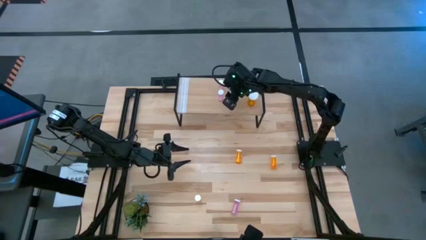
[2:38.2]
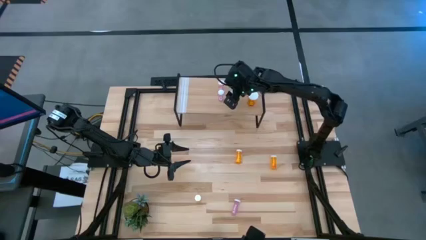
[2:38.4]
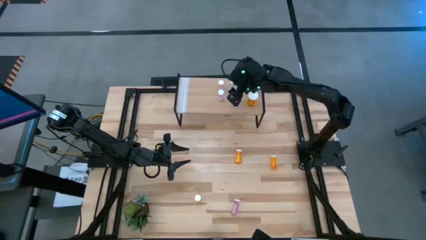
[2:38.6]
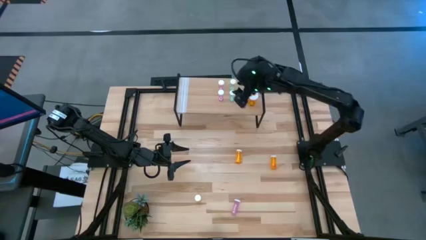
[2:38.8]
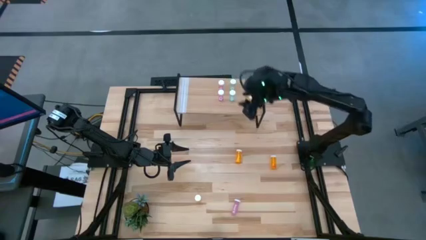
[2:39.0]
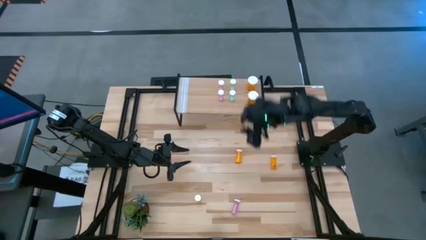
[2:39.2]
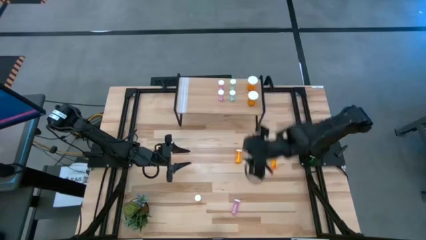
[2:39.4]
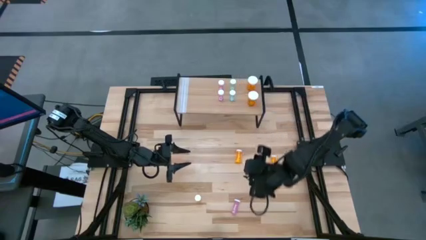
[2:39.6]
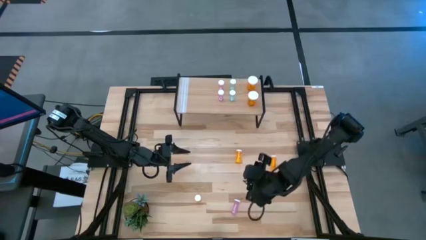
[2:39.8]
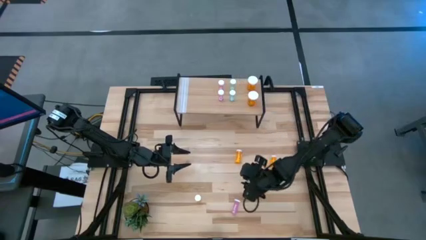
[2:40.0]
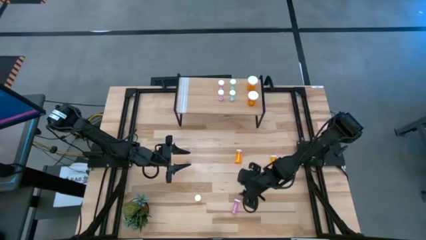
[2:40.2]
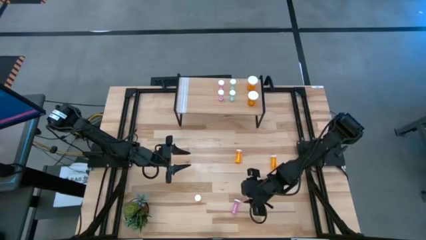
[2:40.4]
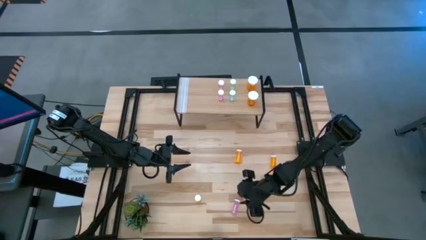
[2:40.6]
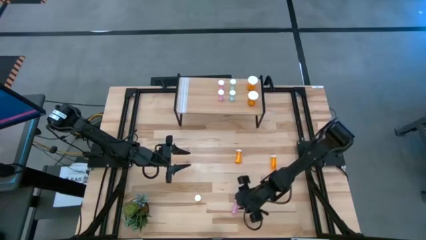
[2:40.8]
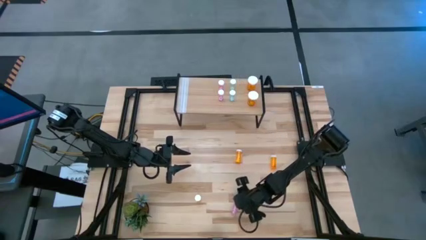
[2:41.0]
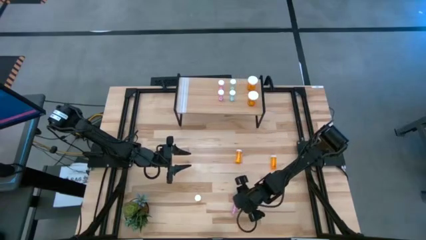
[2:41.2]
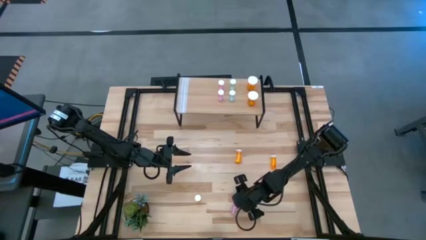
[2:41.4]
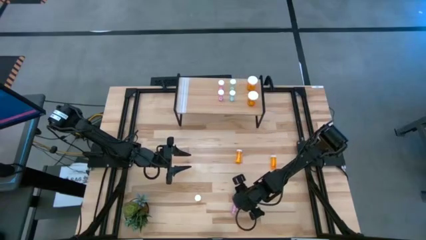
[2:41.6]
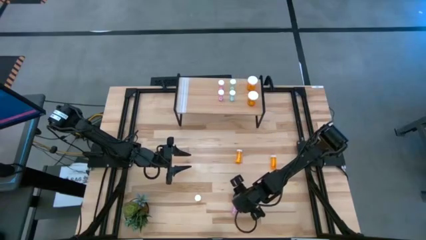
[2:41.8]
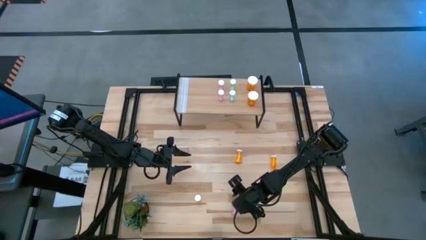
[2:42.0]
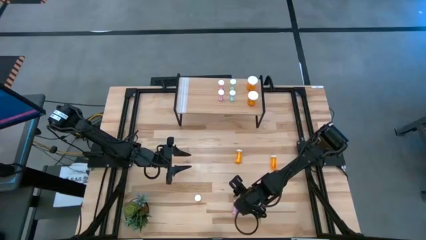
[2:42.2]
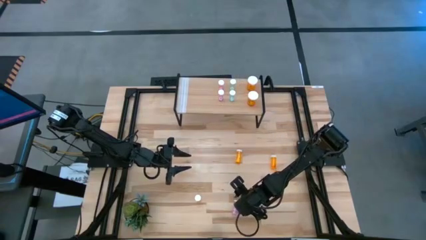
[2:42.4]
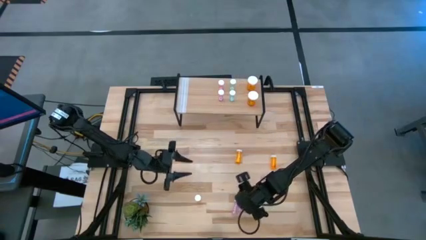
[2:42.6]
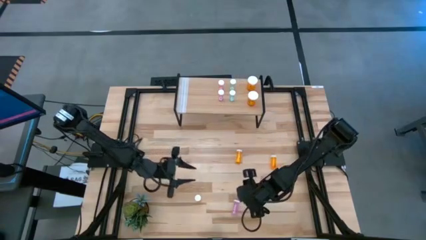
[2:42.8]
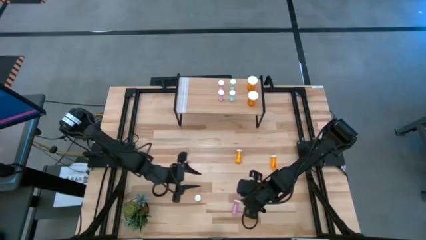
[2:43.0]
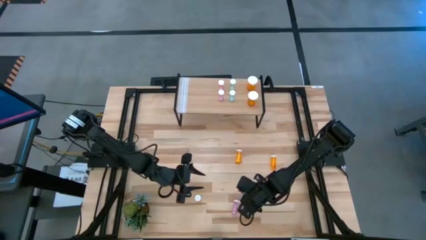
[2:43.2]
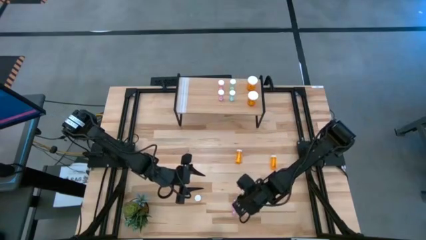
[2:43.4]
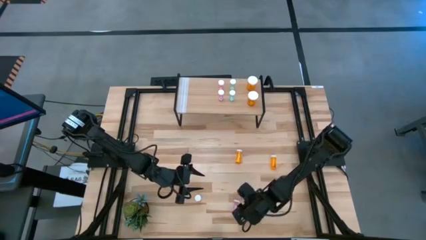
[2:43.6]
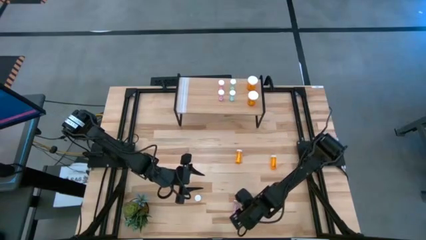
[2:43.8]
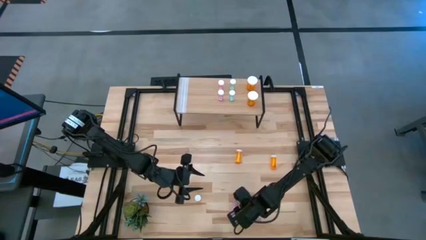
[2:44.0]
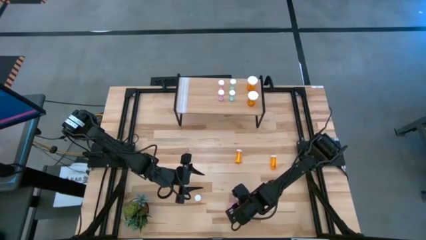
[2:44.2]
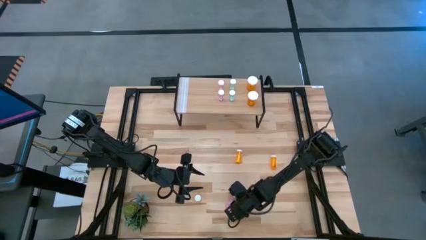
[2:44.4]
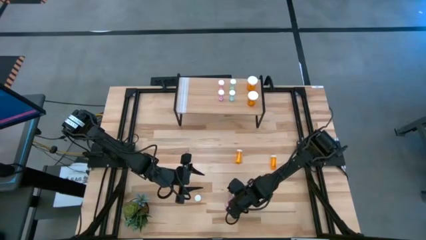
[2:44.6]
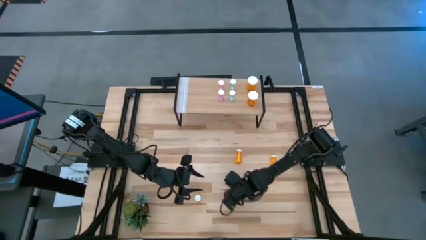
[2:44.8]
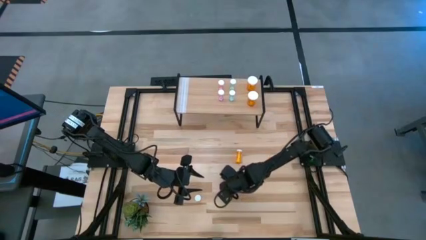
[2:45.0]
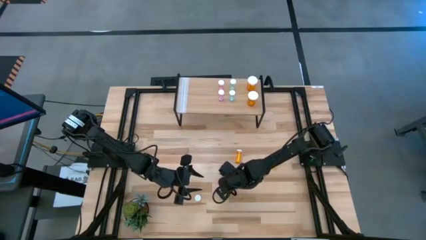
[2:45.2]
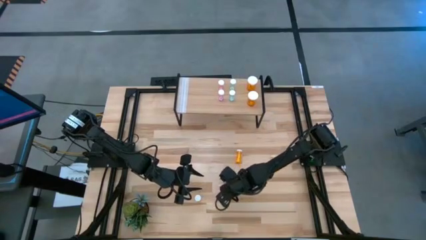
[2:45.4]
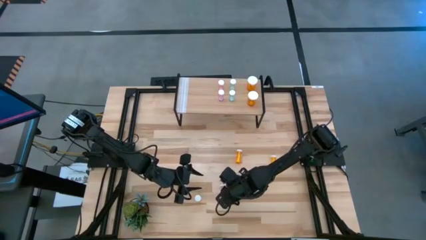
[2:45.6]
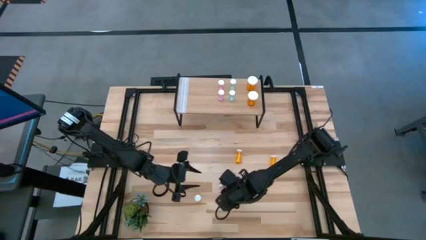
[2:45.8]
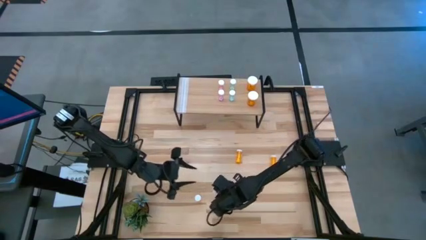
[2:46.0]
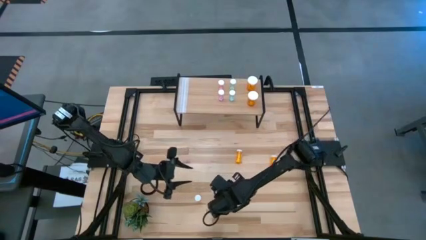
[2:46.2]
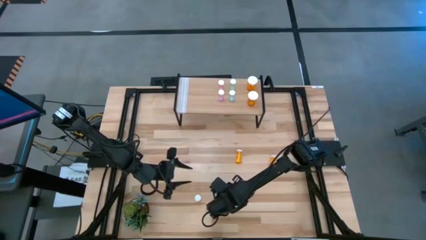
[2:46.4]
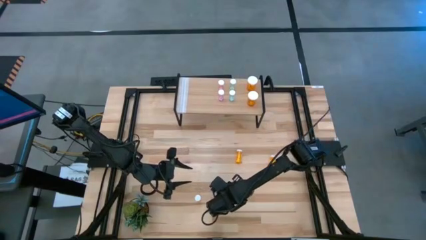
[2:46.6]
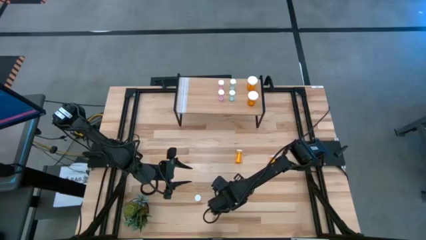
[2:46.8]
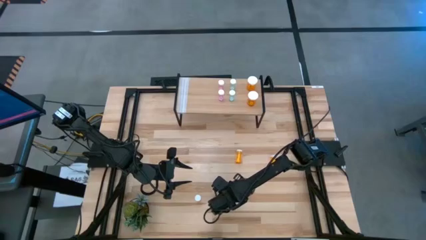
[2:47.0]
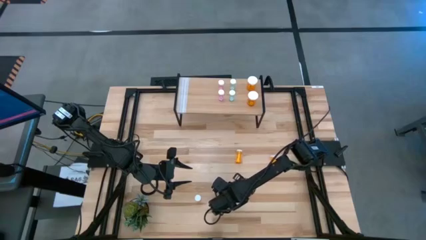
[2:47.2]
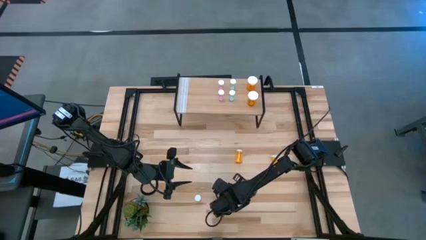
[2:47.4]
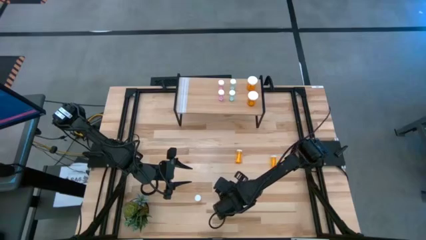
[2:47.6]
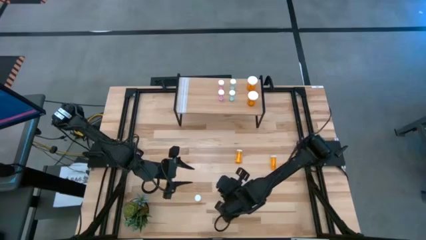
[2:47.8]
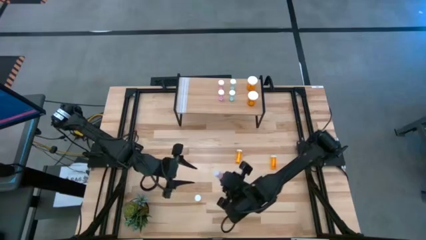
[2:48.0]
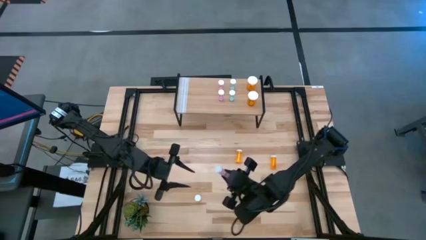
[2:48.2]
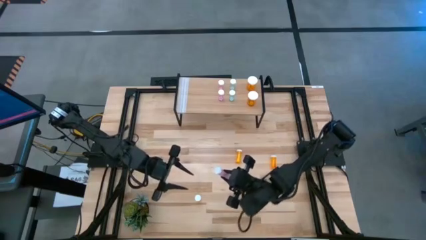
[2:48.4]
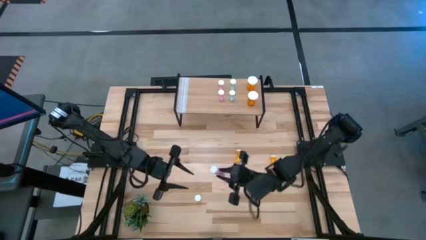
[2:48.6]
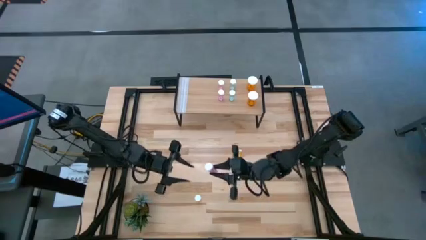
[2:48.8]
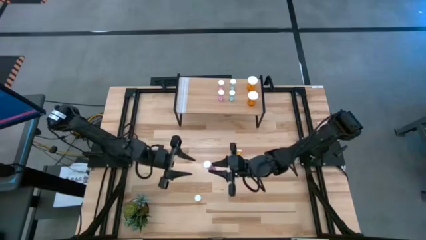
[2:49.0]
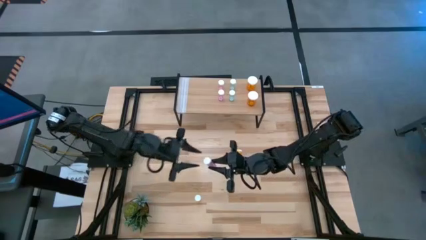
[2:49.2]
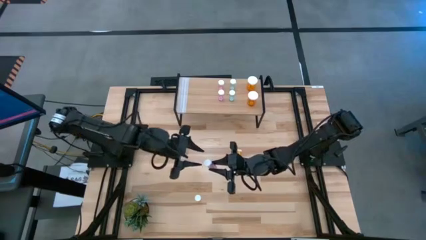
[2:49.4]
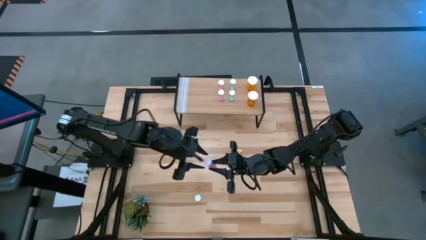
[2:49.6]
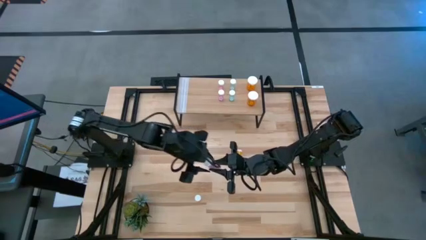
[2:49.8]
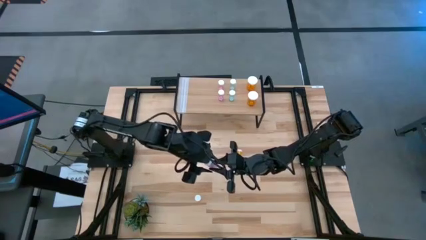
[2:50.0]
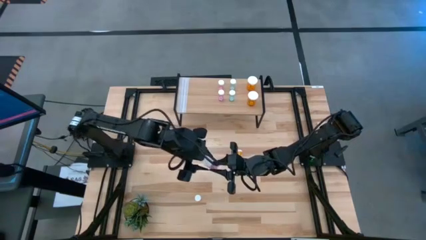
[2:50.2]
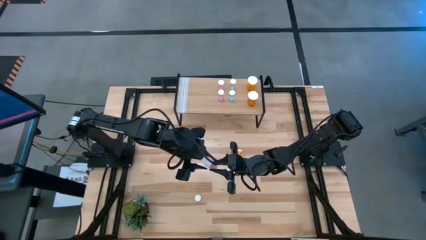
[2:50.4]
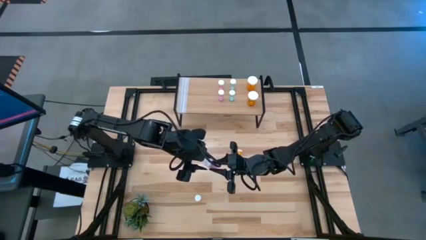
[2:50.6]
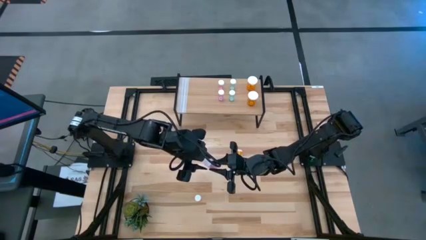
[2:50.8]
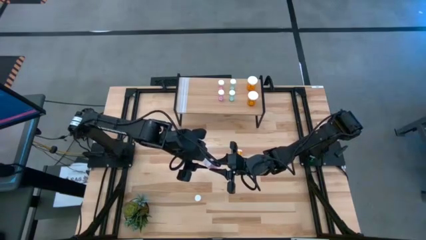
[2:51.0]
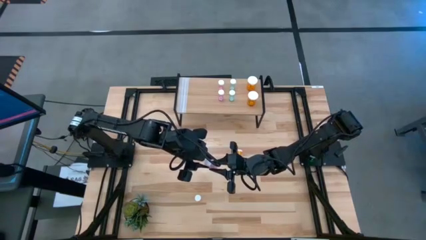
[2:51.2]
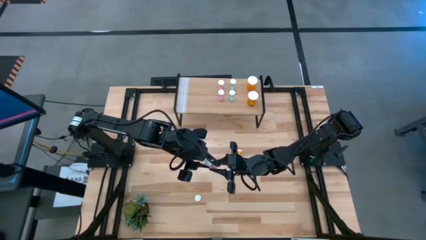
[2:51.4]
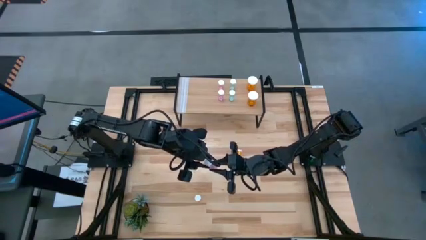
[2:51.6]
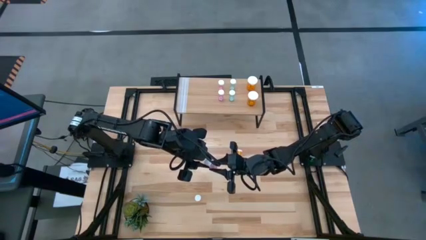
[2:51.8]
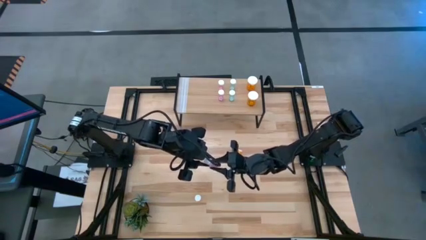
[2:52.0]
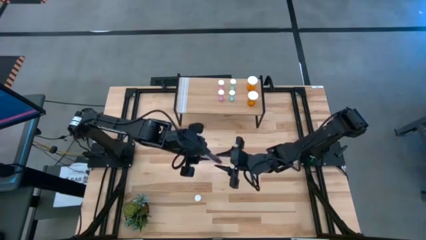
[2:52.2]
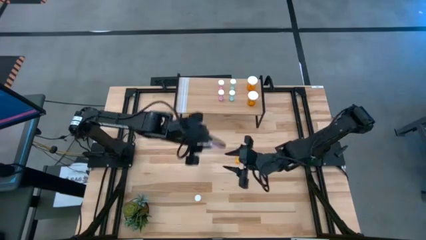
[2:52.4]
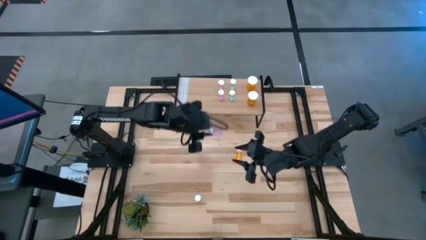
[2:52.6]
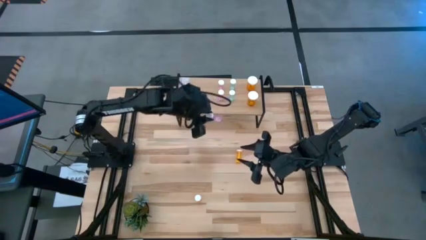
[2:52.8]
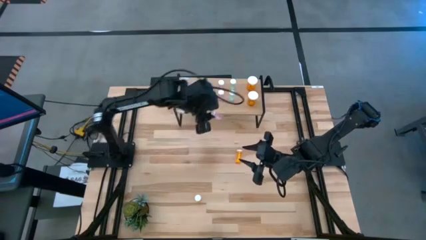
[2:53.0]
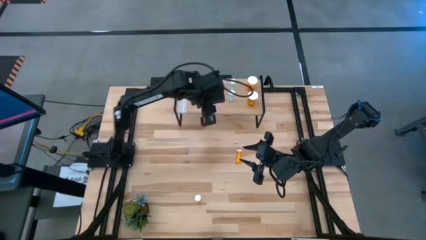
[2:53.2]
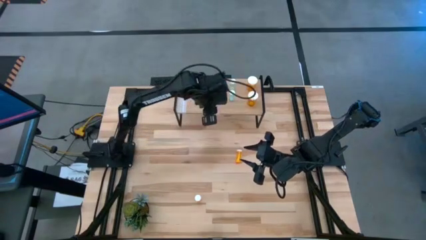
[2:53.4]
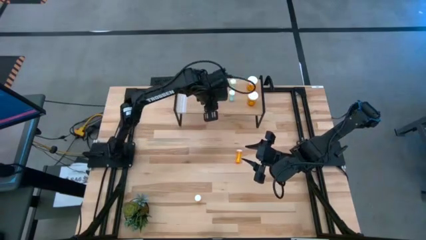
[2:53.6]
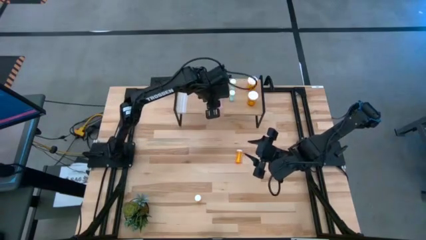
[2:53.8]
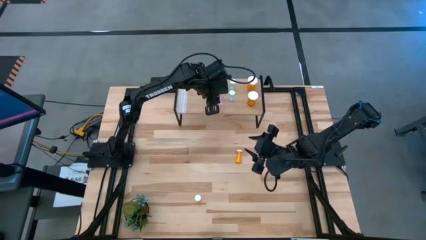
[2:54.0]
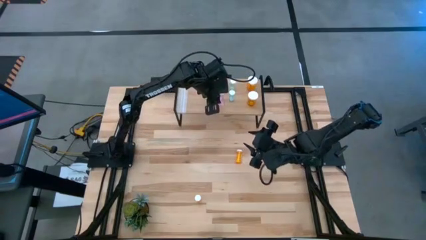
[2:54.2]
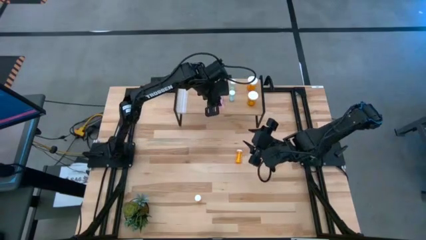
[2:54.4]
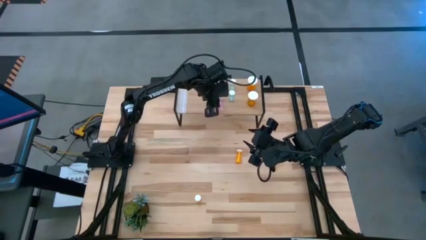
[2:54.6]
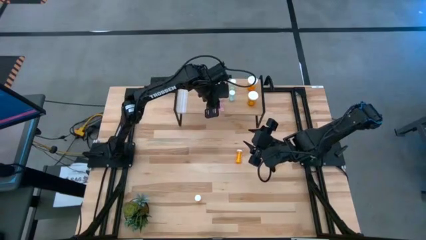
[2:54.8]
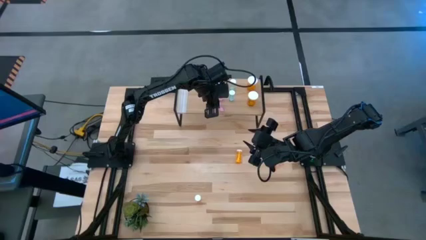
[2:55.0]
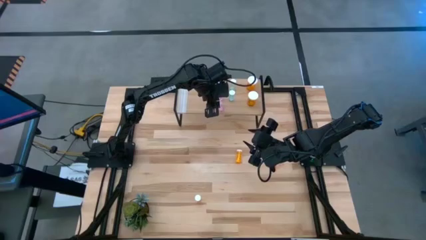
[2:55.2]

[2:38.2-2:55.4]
Task: Pick and place medicine bottles onto shelf by color
Put the small pink pill bottle on the shelf aligned with the other small pink pill bottles
